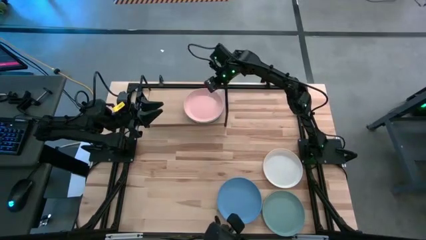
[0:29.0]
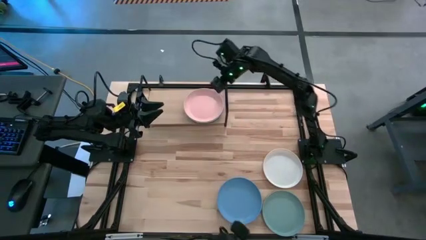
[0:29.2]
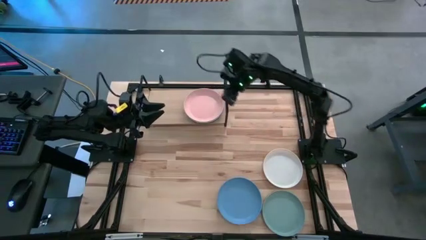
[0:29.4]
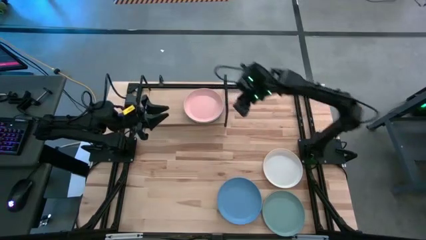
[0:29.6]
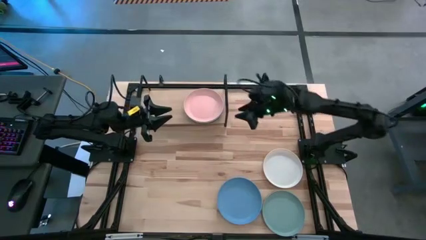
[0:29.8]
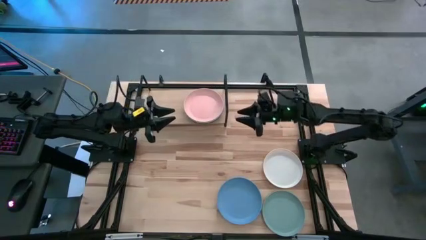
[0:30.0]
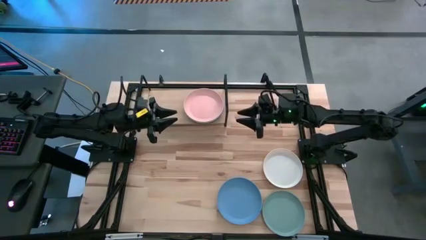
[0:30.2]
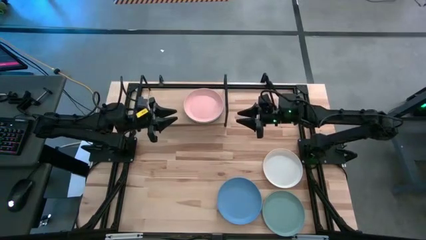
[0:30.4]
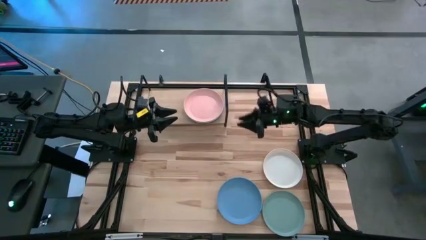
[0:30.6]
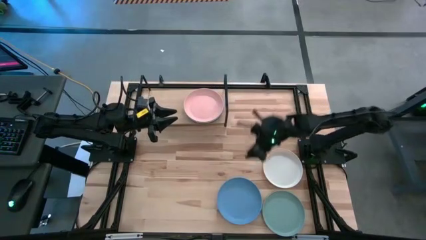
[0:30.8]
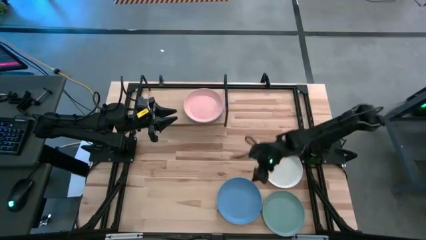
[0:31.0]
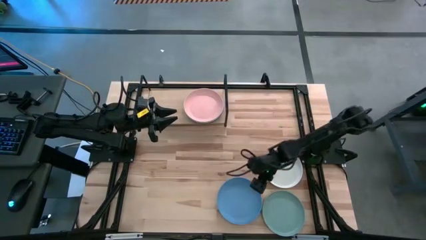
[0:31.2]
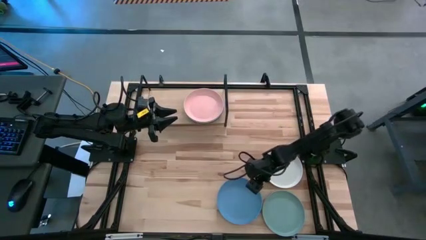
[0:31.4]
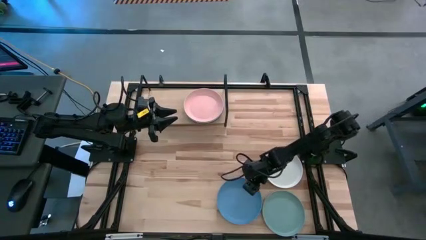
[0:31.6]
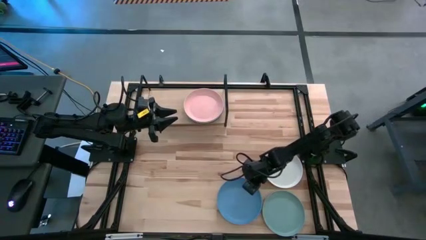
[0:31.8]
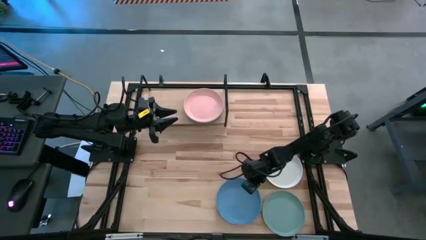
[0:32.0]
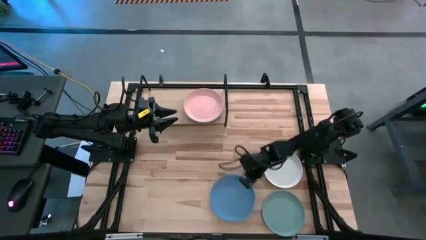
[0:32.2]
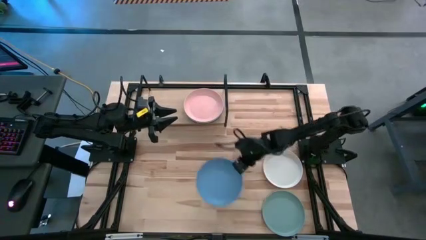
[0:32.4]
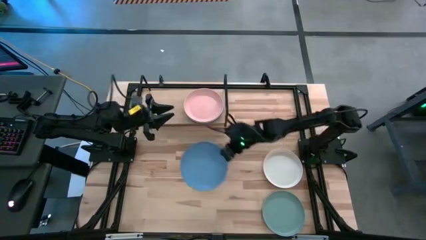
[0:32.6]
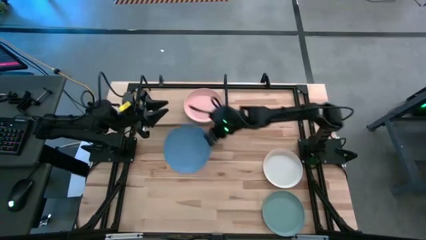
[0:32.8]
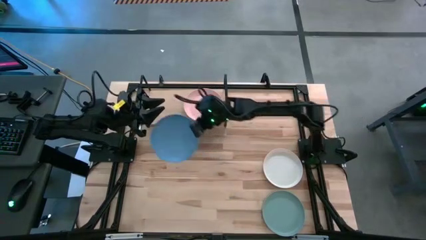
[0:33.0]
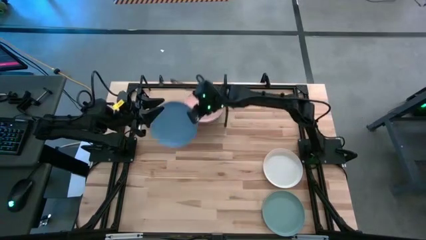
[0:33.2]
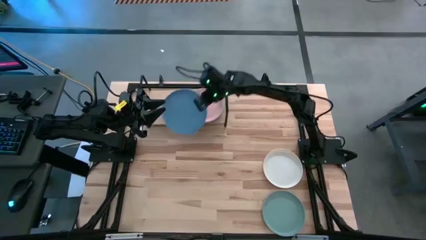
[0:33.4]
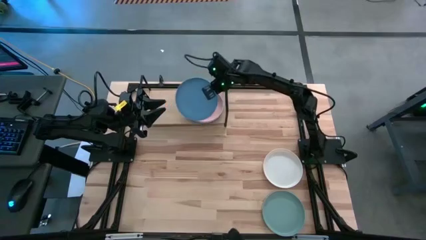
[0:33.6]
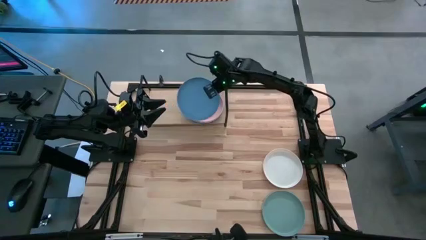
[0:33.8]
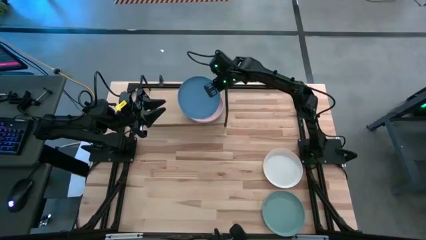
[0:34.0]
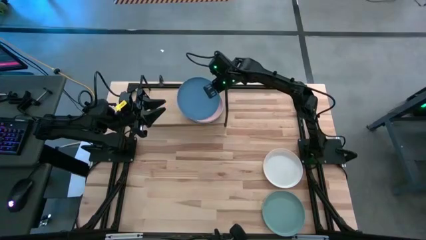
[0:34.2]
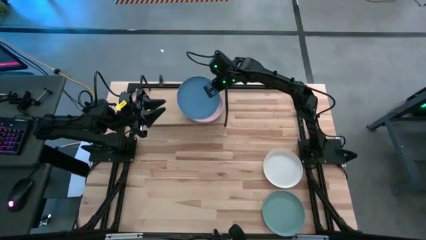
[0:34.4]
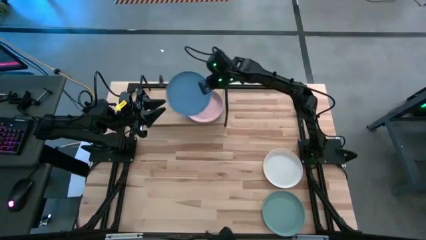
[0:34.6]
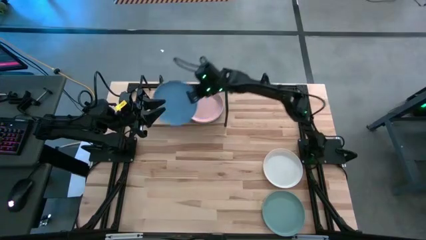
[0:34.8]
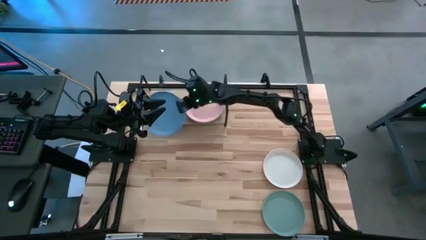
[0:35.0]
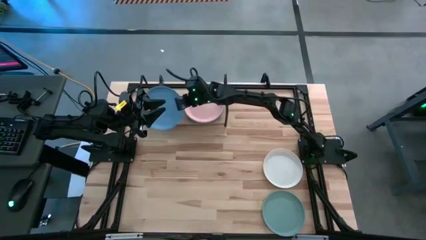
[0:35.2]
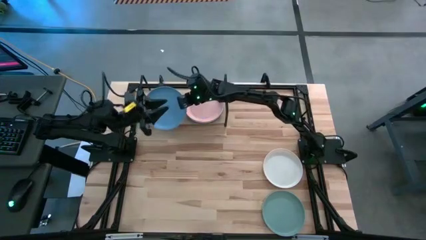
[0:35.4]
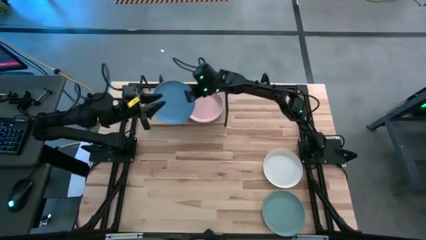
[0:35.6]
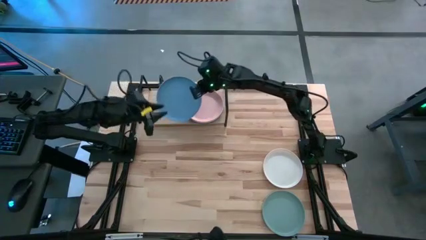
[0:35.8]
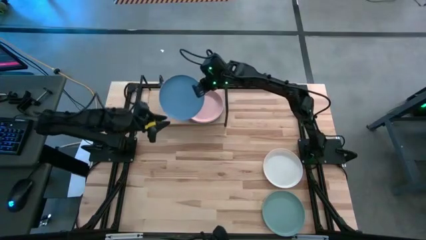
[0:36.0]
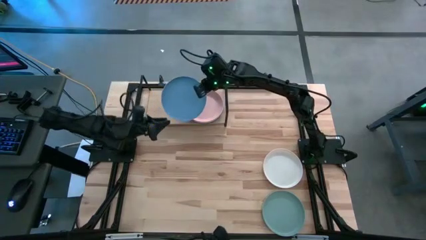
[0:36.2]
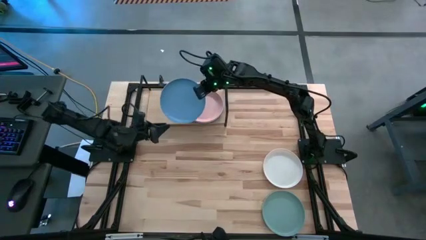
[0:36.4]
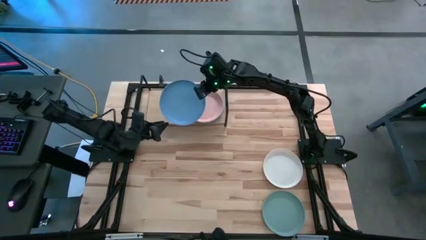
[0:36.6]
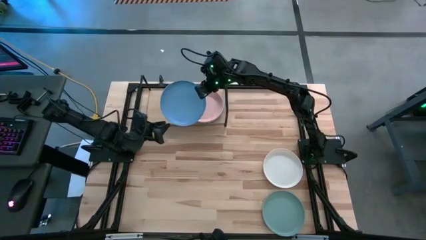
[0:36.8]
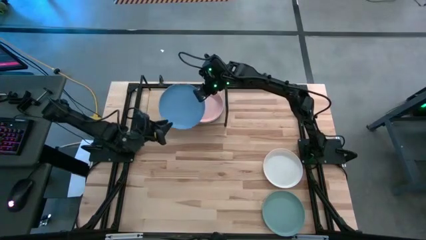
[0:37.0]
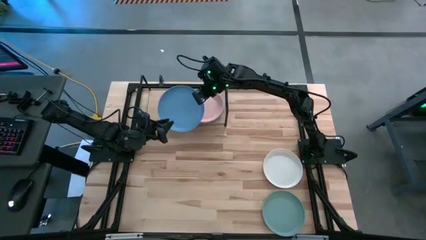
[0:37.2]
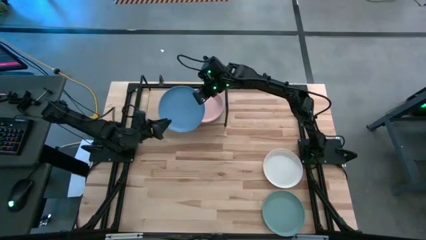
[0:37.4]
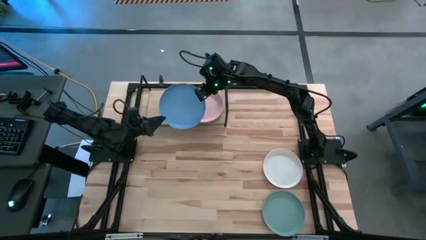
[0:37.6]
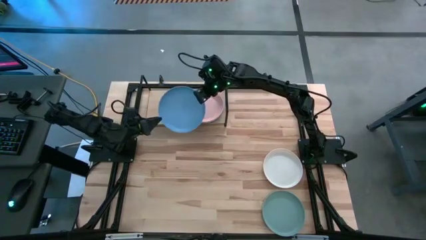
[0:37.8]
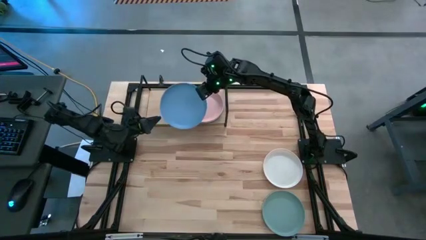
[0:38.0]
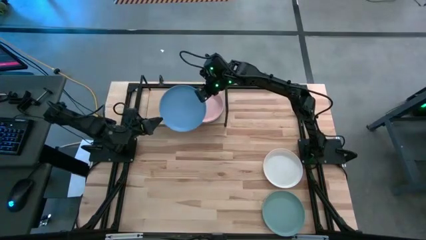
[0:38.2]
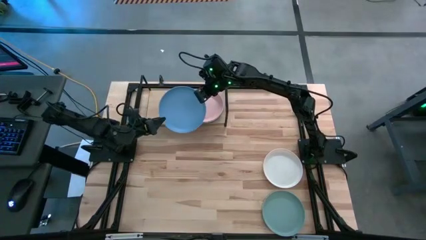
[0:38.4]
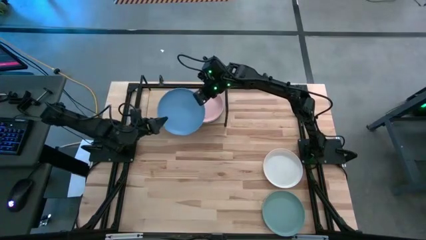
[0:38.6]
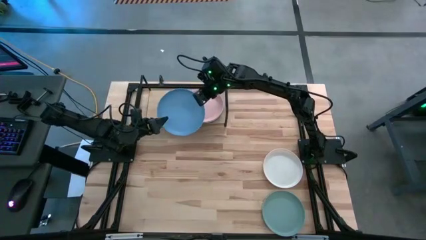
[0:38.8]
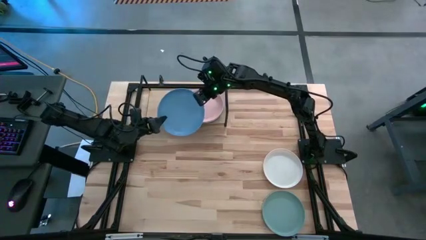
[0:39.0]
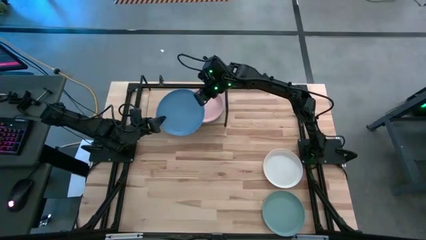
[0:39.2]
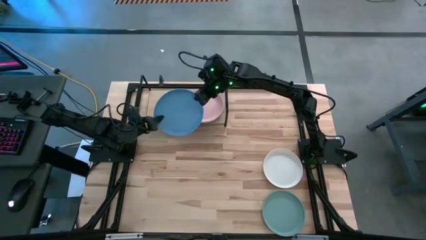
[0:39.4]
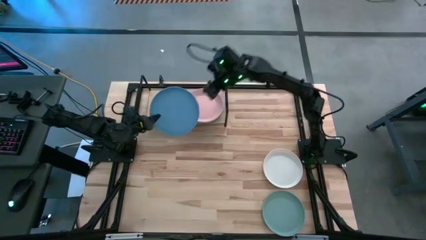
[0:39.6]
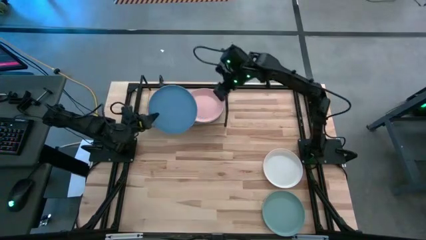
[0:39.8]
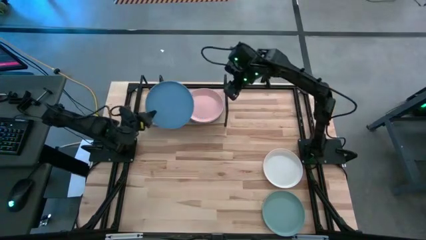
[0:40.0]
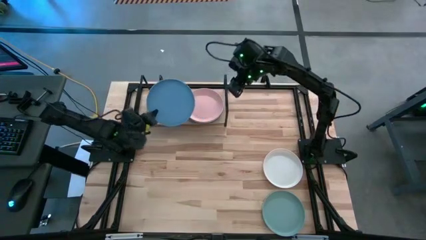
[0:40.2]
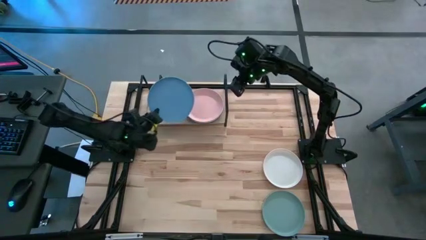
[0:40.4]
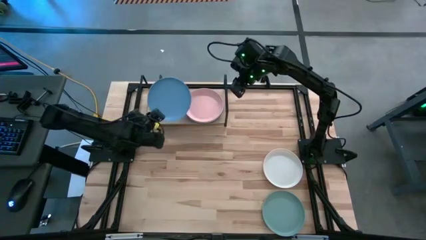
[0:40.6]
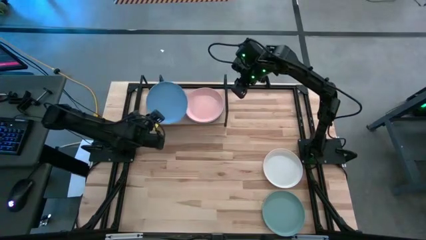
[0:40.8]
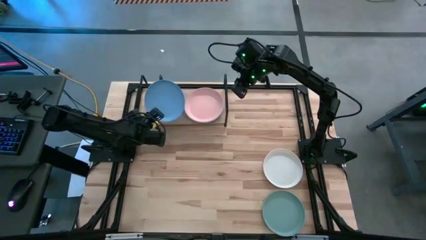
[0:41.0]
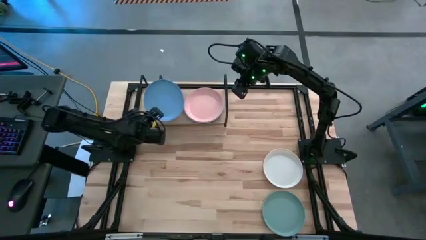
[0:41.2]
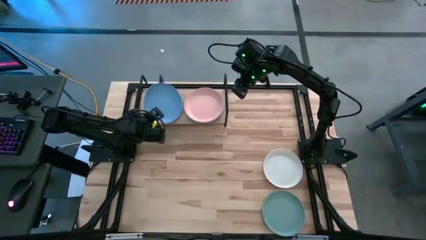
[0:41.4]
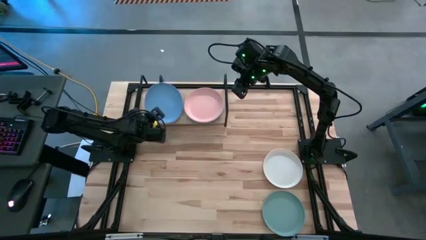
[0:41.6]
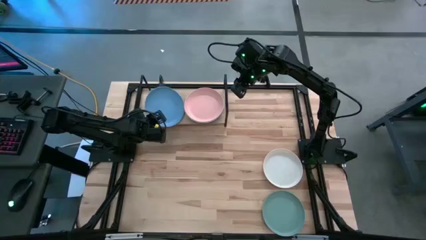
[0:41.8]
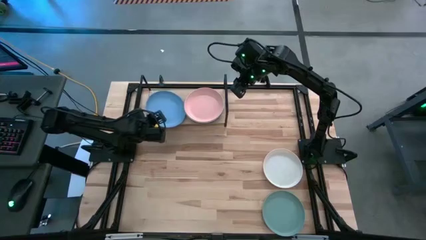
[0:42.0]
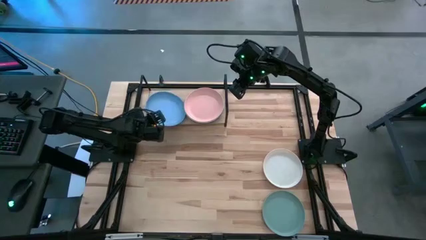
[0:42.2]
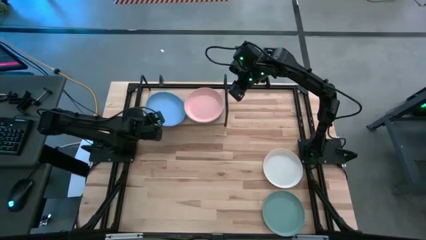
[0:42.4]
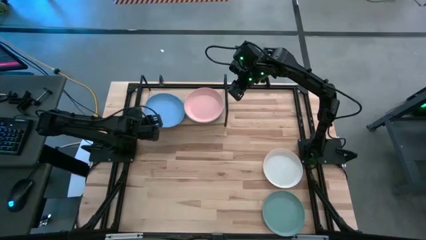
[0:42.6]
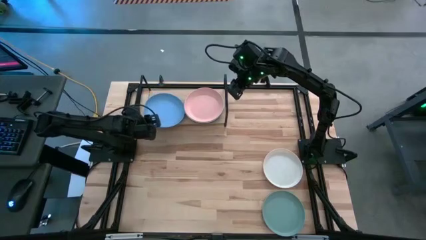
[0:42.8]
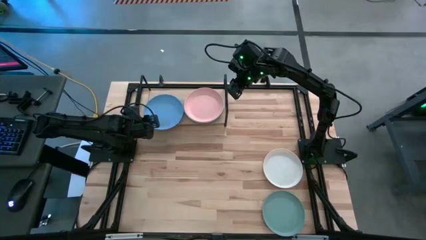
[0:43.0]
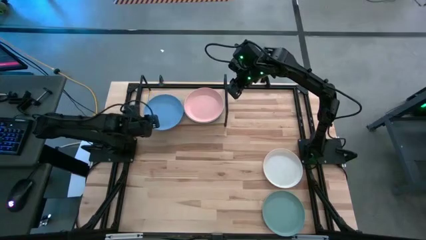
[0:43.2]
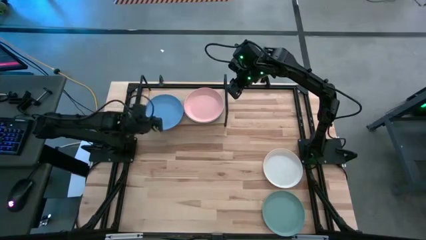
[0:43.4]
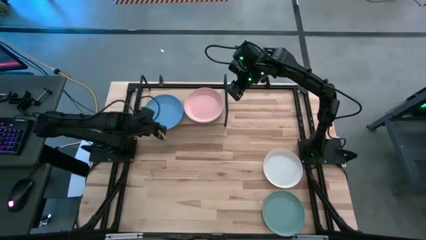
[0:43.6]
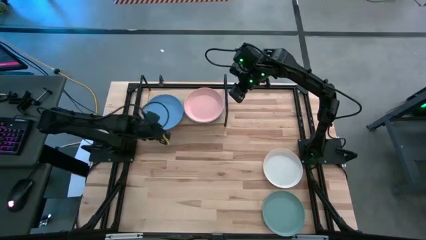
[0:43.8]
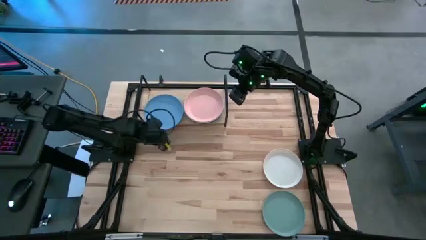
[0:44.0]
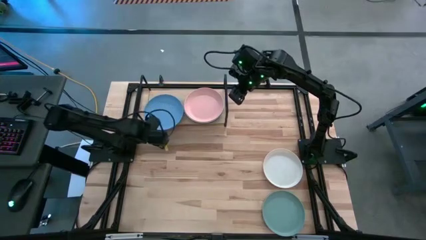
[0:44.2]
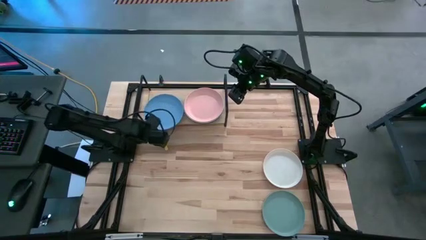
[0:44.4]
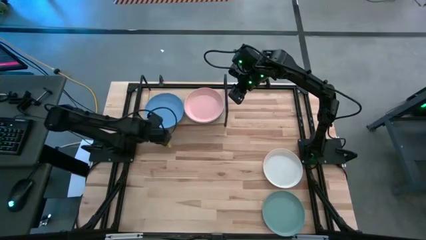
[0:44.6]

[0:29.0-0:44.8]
Task: Place and stack plates onto a shelf
Put the blue plate into the shelf
